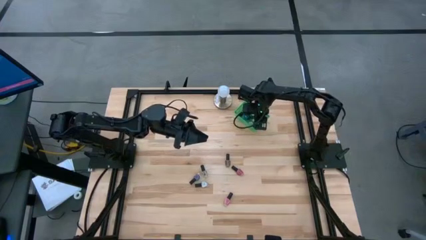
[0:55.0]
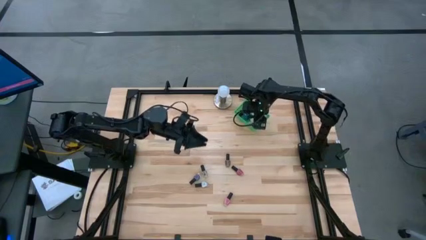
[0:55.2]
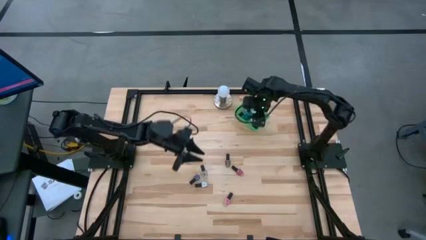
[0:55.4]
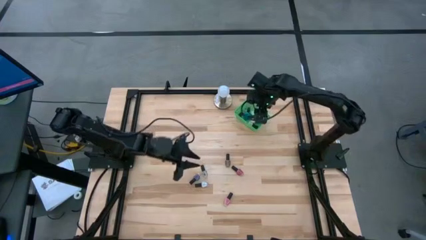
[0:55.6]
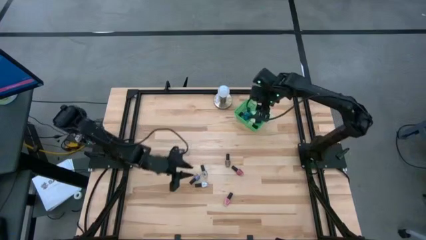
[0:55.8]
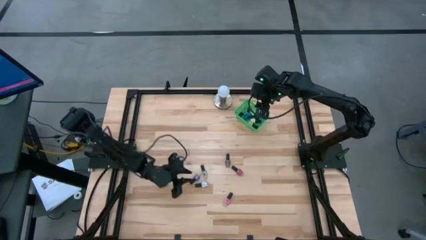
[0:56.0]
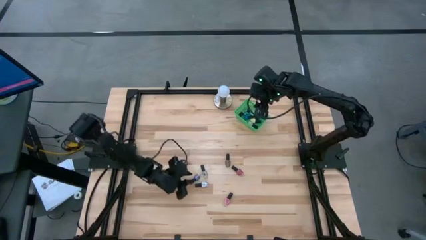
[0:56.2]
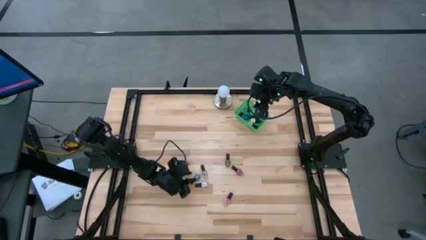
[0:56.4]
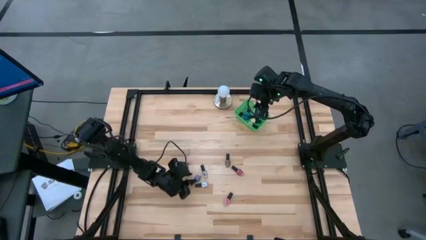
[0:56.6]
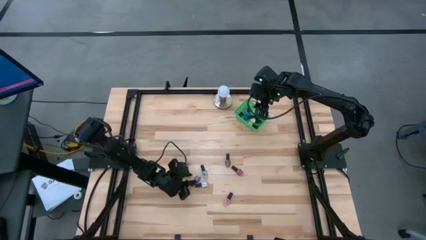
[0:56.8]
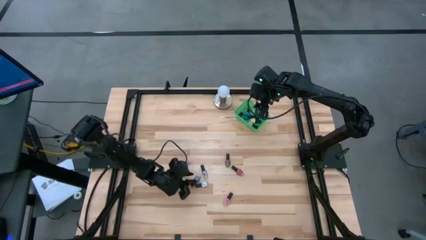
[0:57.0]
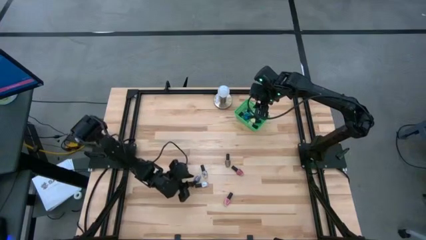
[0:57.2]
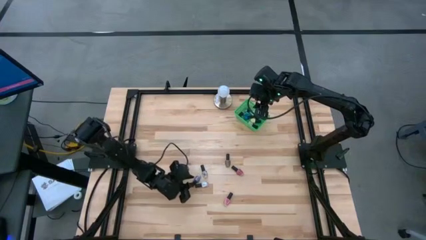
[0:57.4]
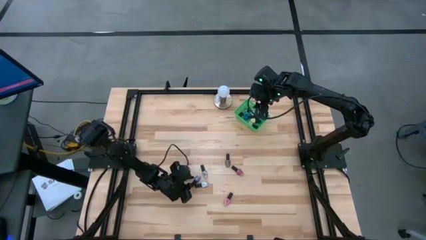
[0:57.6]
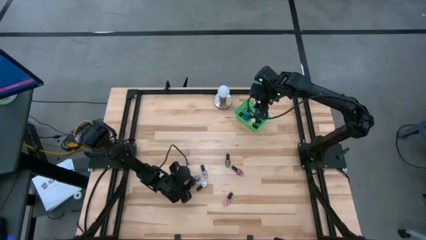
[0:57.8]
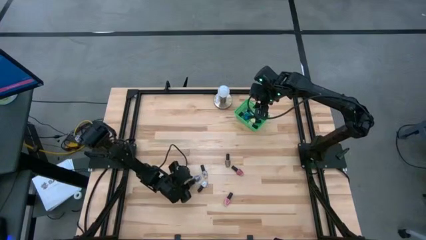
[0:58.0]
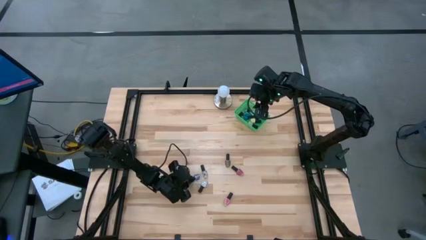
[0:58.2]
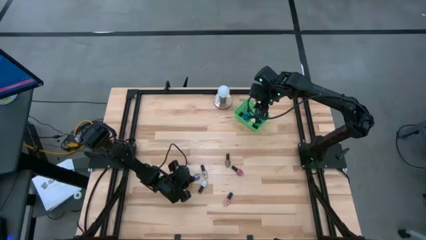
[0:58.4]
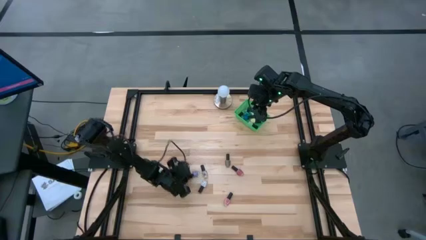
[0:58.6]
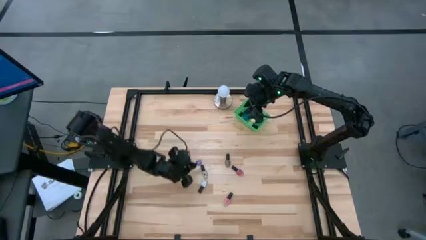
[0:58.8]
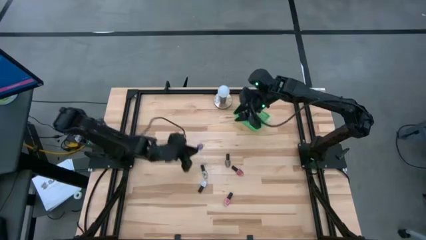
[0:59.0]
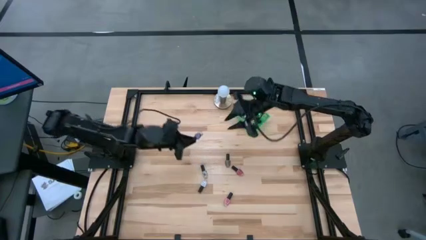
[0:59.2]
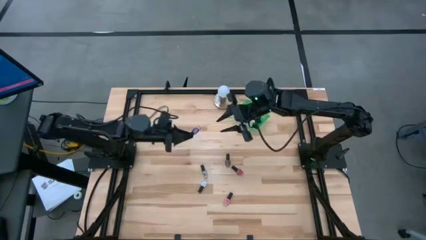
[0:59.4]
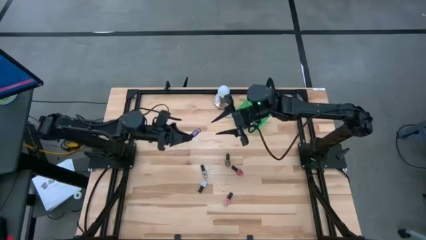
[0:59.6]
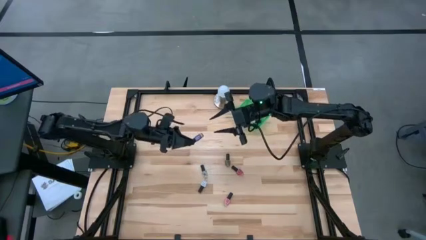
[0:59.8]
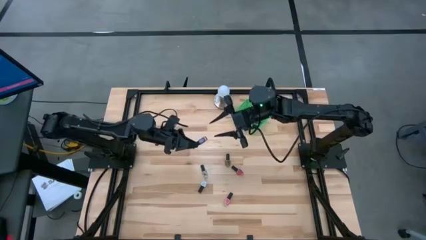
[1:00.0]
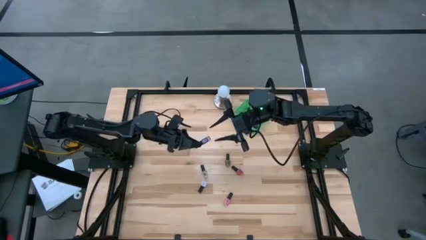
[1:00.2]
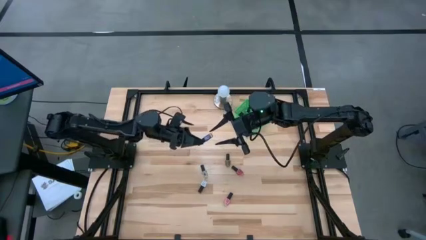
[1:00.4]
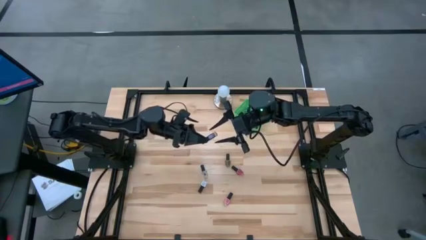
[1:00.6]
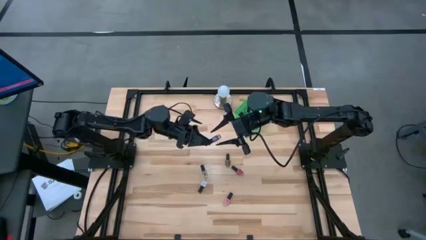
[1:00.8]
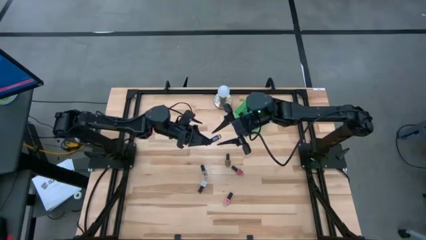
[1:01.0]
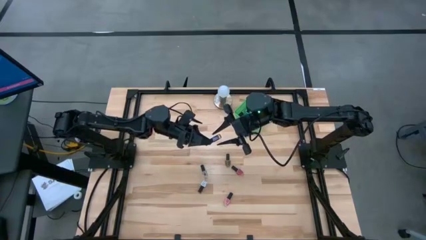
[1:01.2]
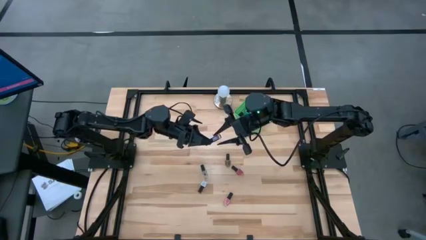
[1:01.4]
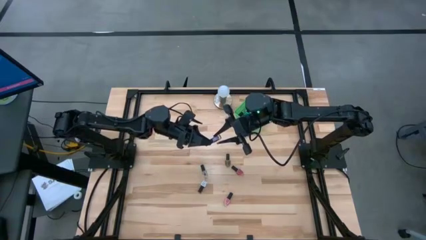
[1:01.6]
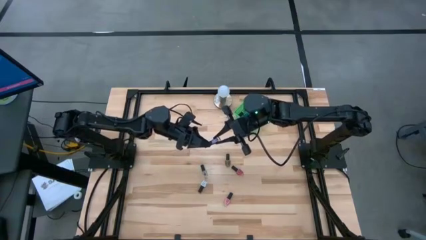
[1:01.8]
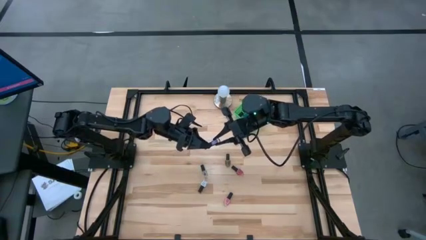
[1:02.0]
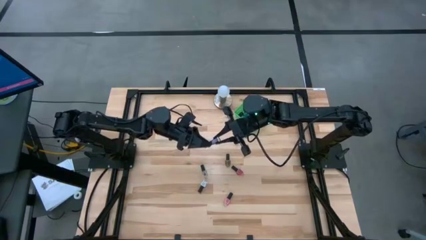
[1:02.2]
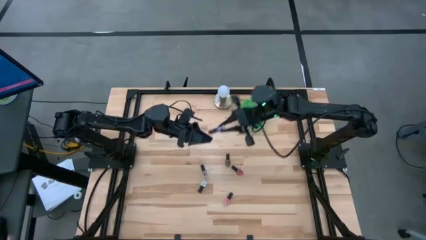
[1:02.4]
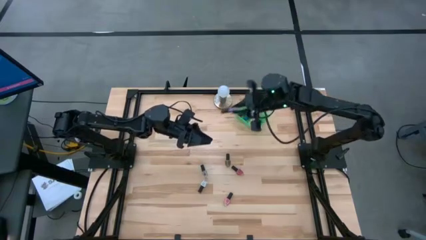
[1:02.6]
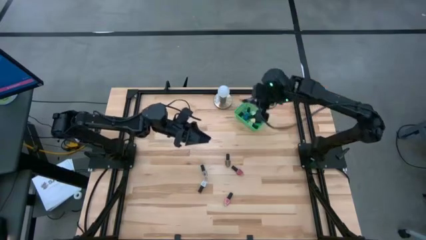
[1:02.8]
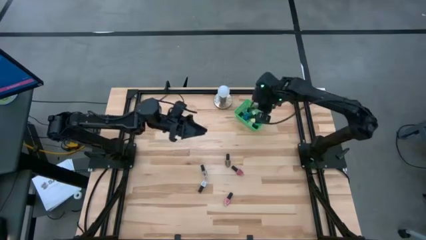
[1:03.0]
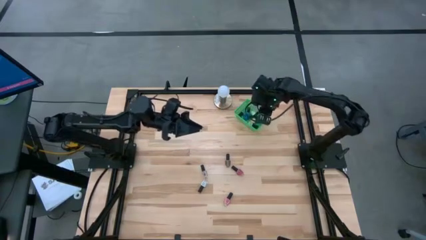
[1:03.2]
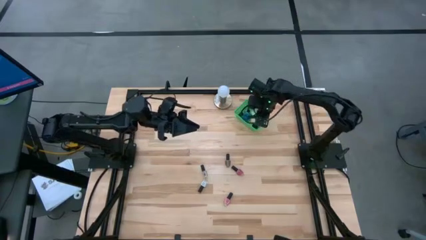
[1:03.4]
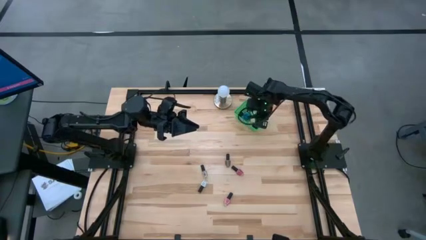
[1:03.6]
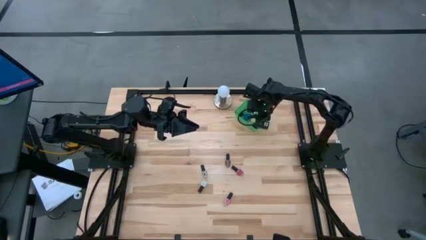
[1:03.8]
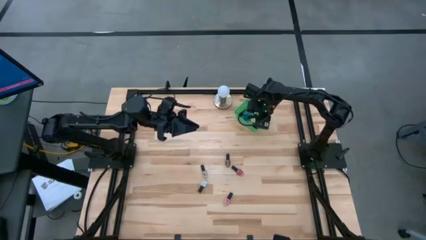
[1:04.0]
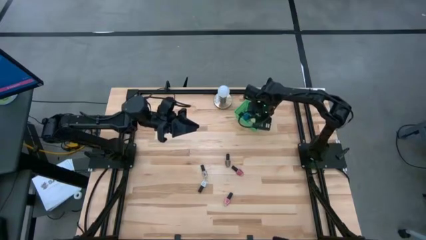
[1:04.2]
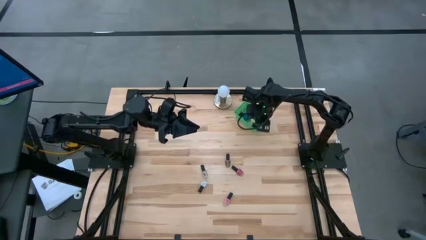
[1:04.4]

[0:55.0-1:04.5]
Task: Pick & Place Nail Polish
Put the violet nail polish bottle into the green bin

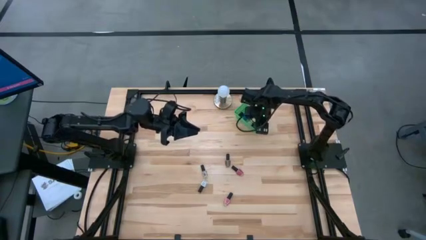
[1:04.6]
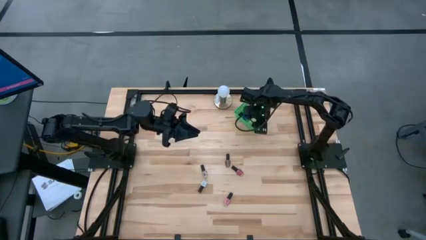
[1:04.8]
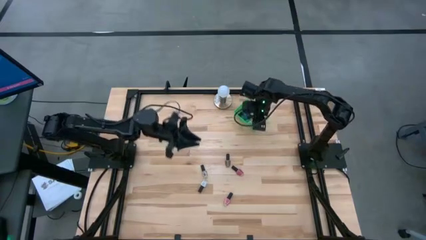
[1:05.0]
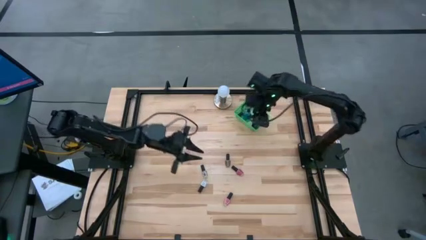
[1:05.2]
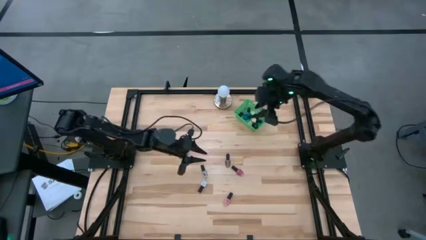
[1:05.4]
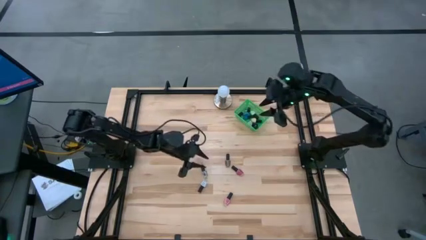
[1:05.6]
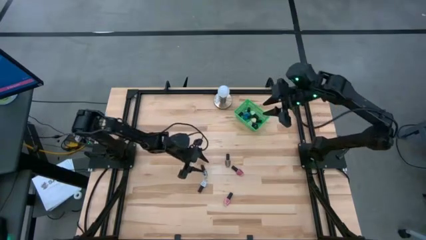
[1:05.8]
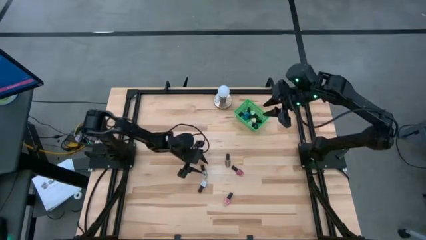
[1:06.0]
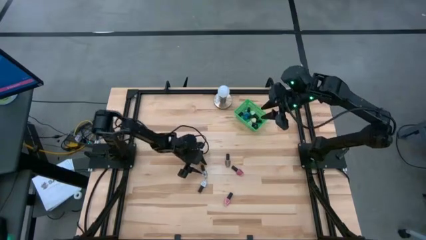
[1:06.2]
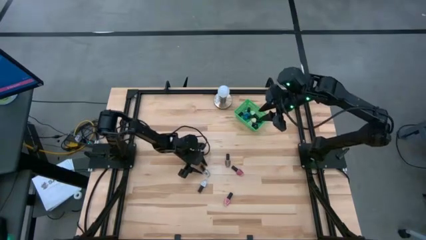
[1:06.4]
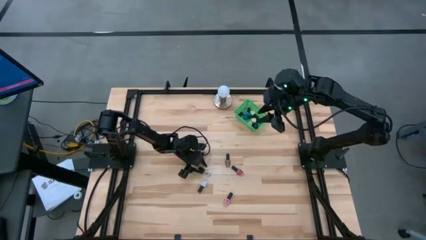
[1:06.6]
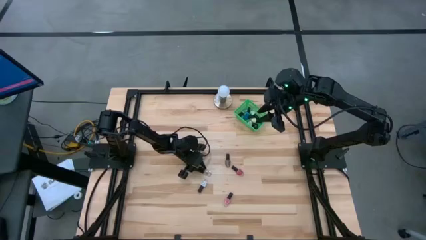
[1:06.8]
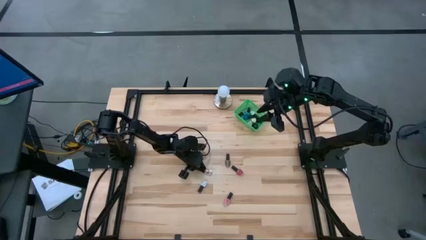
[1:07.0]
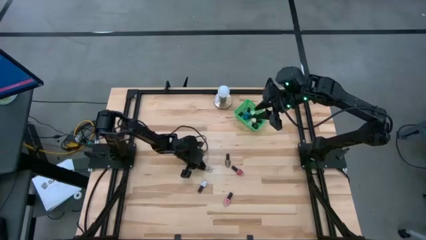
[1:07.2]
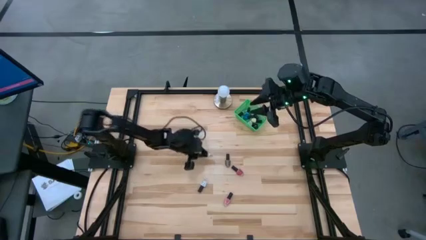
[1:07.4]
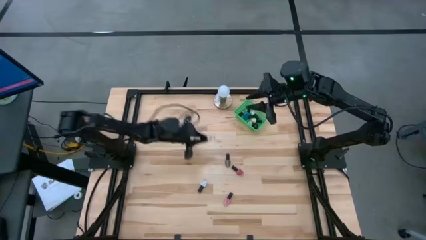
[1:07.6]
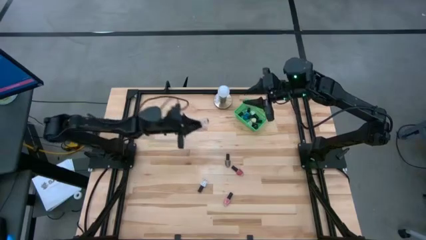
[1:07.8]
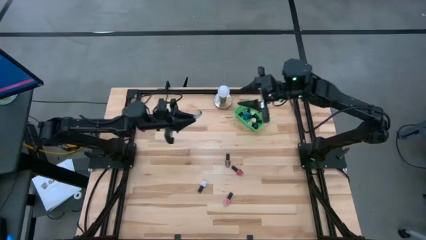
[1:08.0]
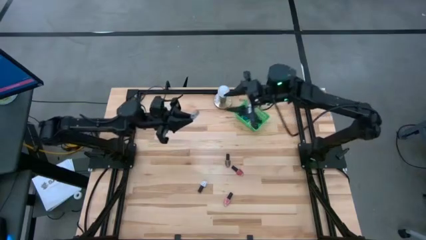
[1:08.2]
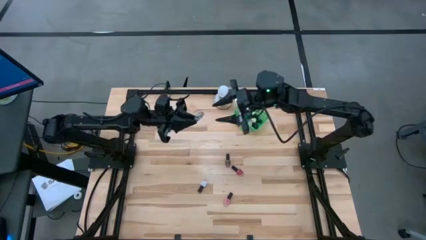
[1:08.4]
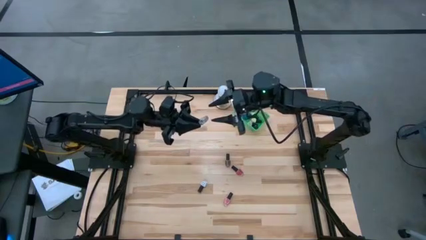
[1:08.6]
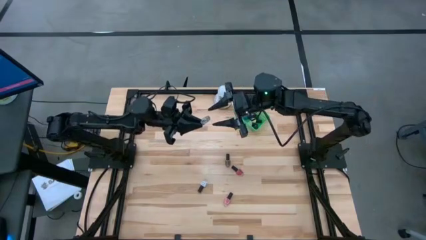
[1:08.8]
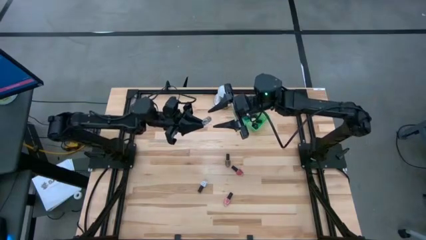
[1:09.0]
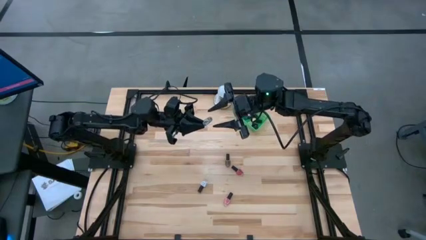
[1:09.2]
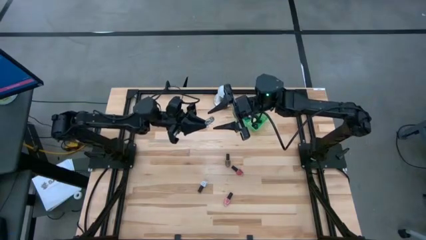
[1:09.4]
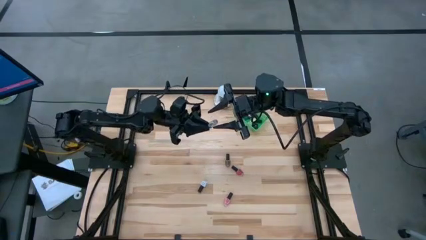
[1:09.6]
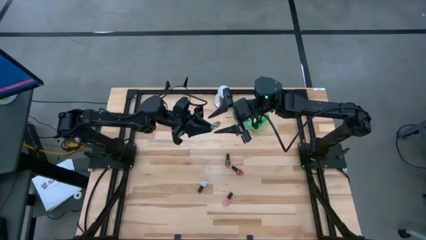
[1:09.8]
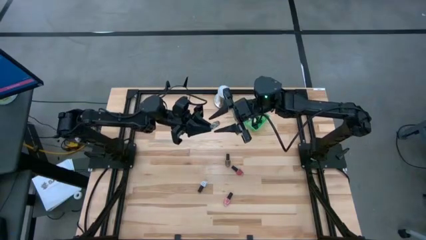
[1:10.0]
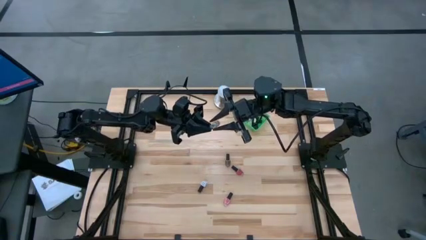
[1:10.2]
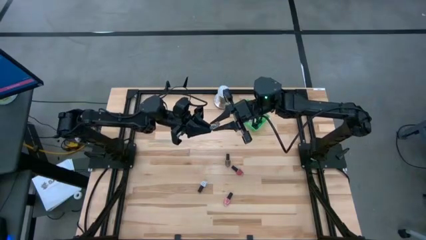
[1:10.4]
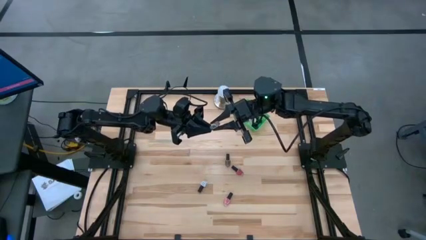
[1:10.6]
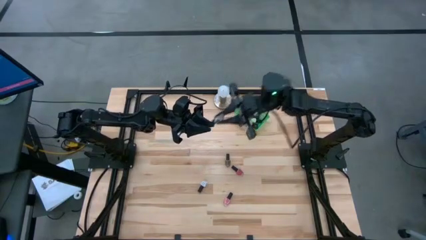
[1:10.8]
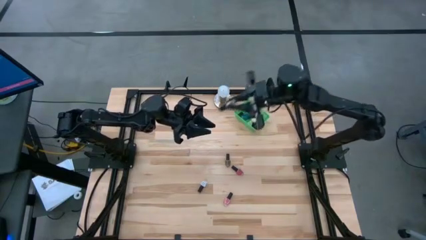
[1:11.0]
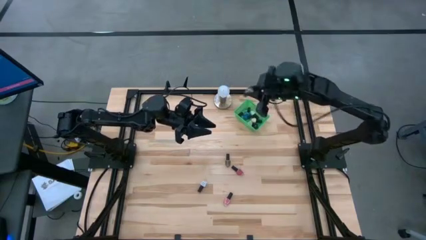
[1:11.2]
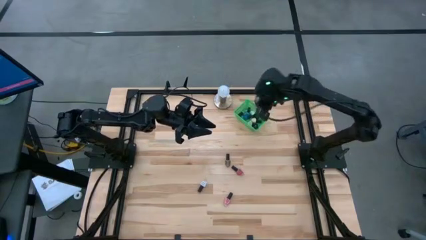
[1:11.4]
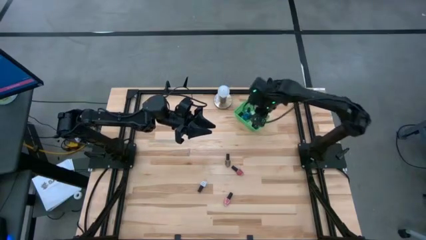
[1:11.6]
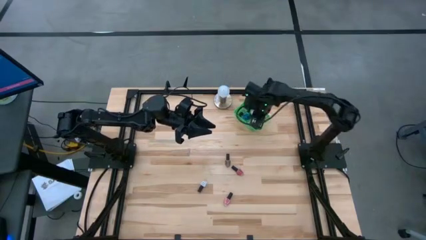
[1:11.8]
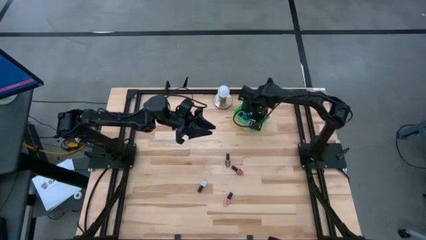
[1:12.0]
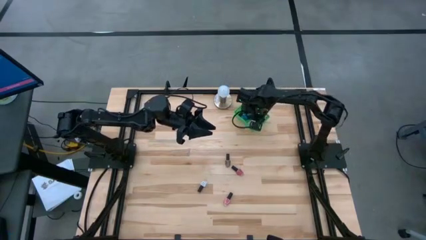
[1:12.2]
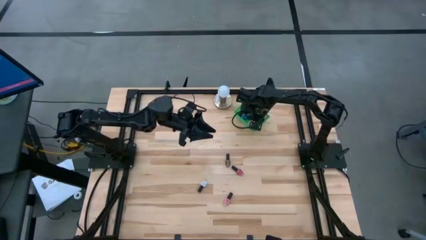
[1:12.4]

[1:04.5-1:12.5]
Put the transparent nail polish bottle into the green bin
